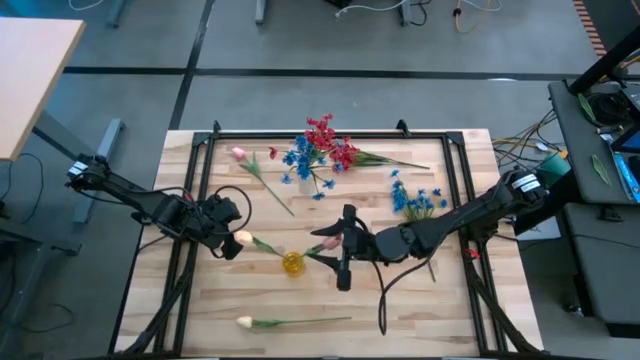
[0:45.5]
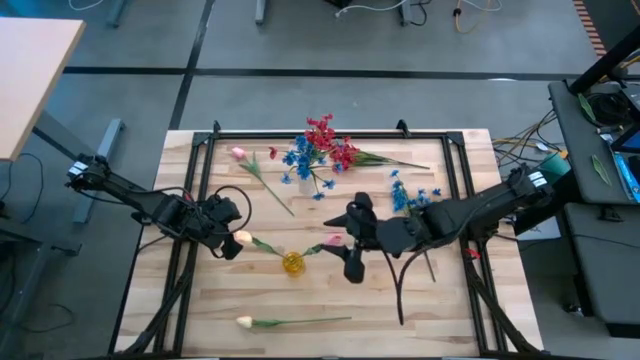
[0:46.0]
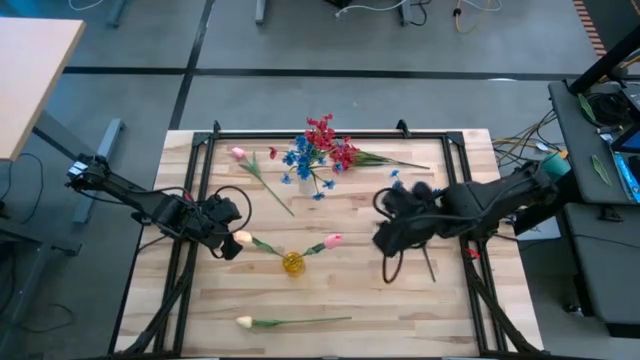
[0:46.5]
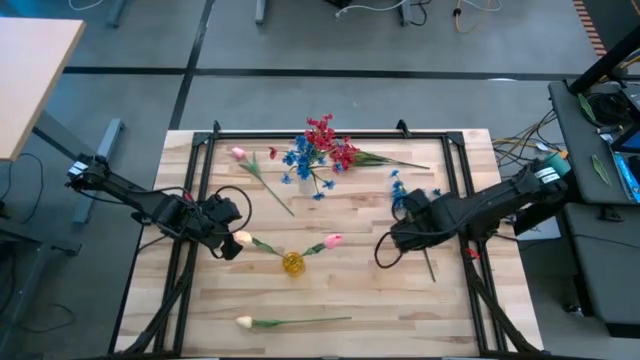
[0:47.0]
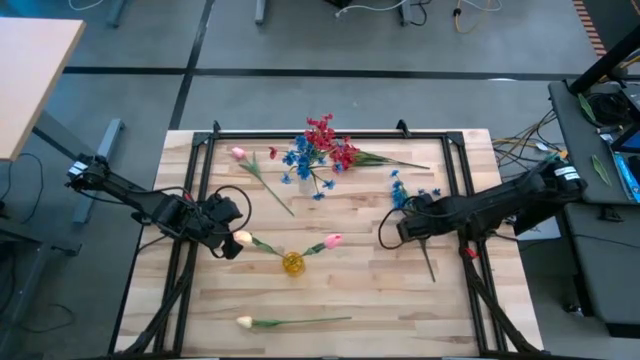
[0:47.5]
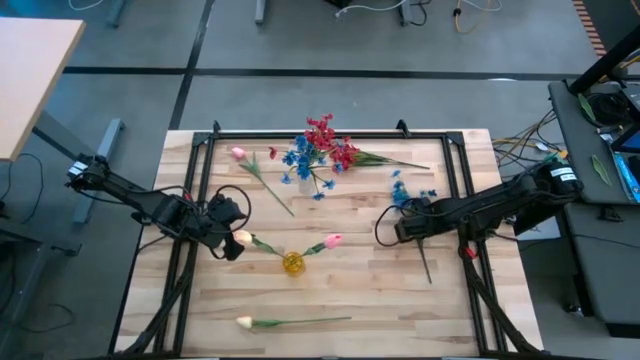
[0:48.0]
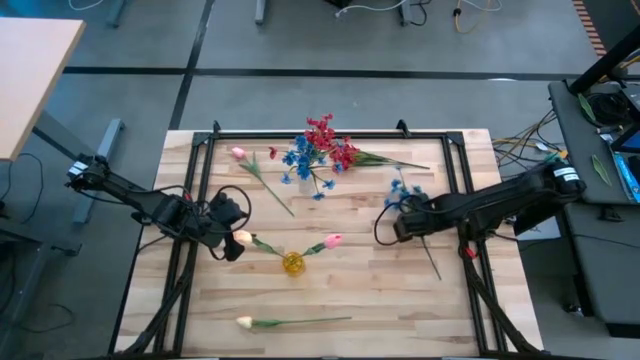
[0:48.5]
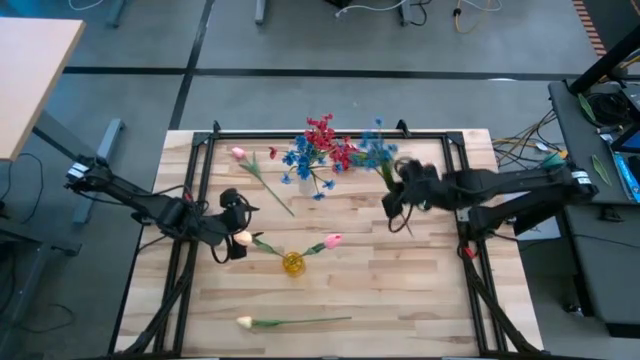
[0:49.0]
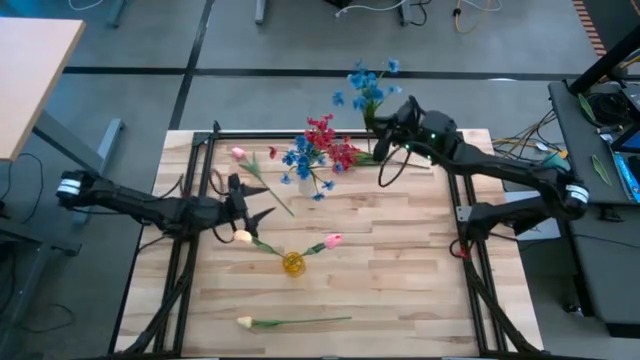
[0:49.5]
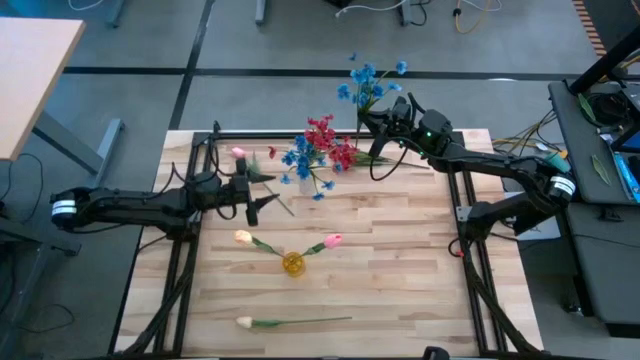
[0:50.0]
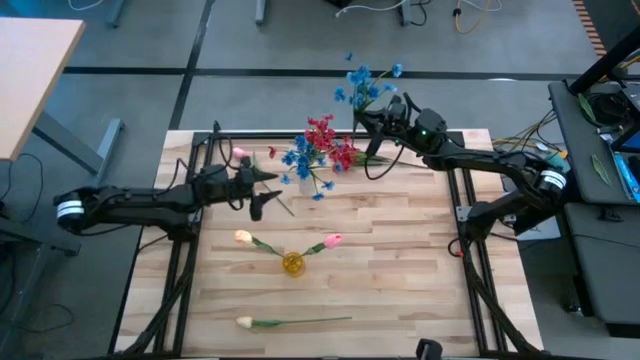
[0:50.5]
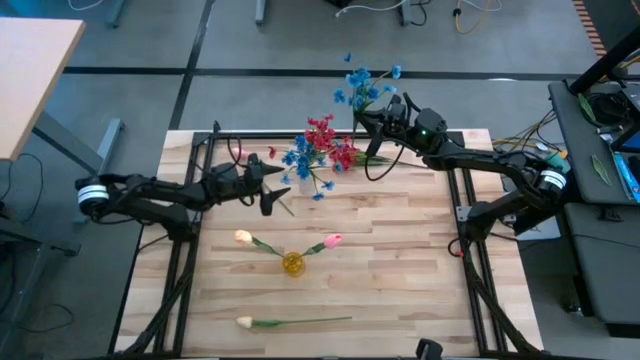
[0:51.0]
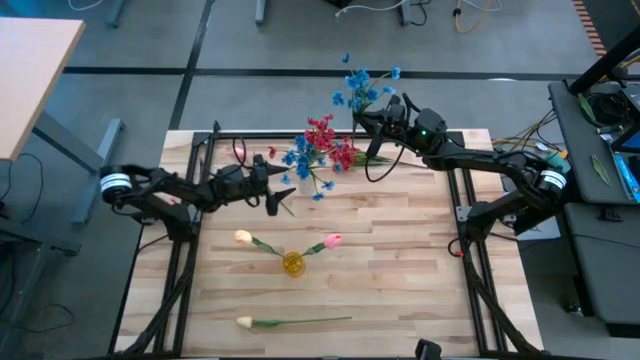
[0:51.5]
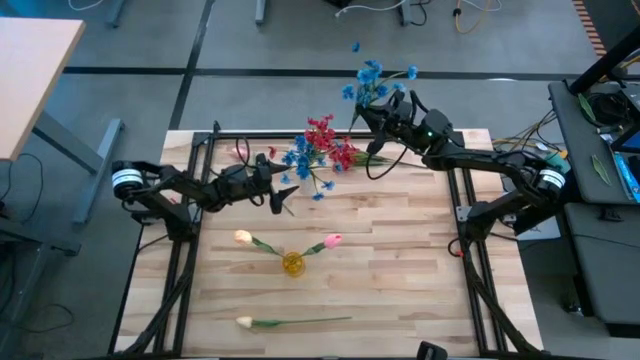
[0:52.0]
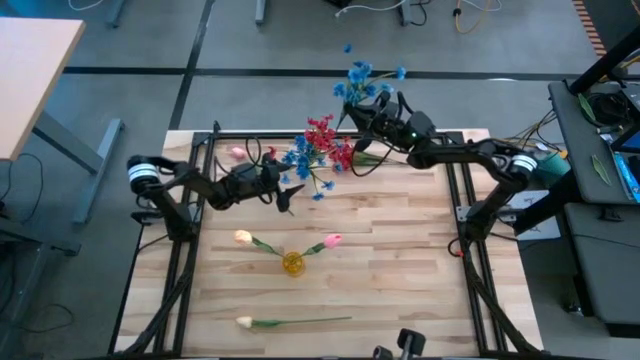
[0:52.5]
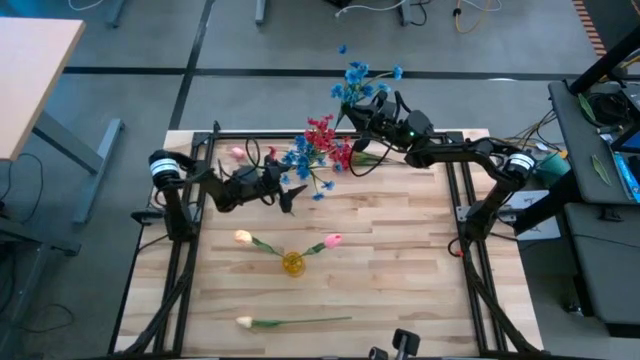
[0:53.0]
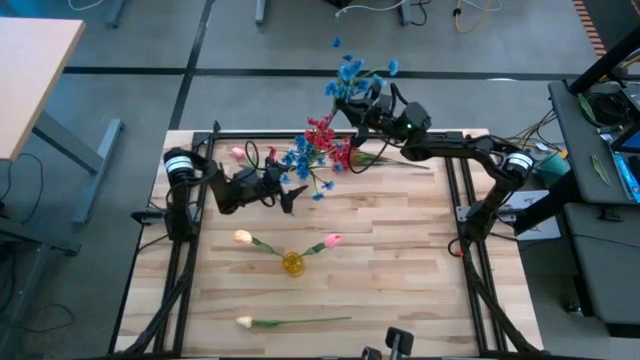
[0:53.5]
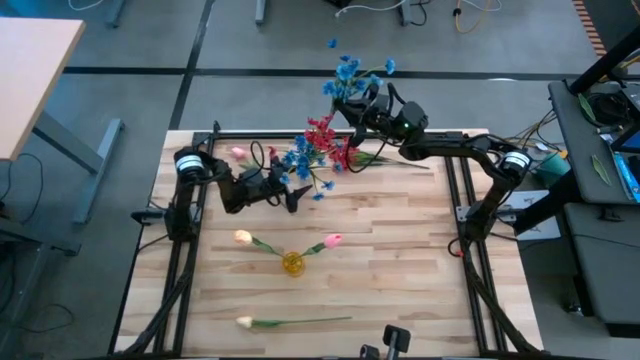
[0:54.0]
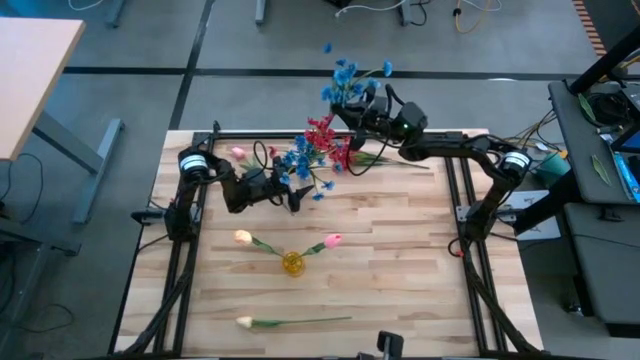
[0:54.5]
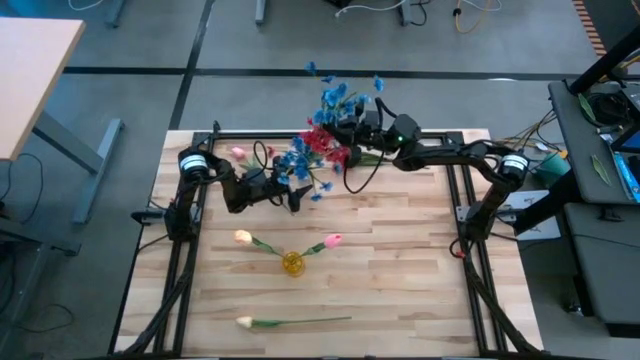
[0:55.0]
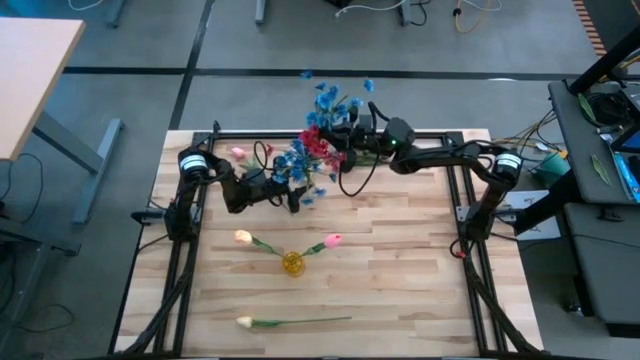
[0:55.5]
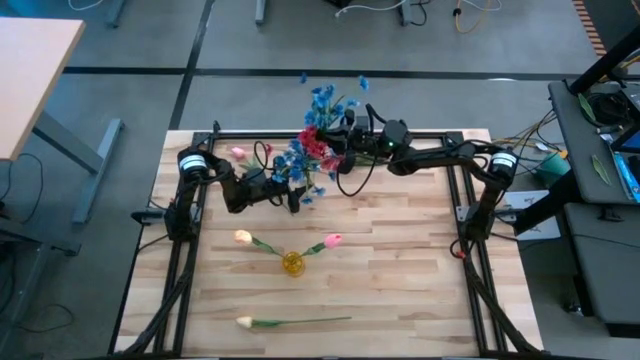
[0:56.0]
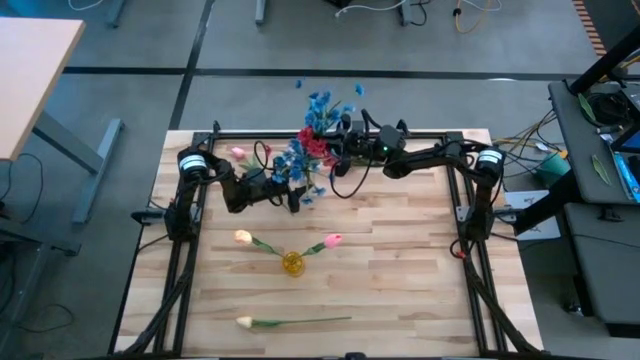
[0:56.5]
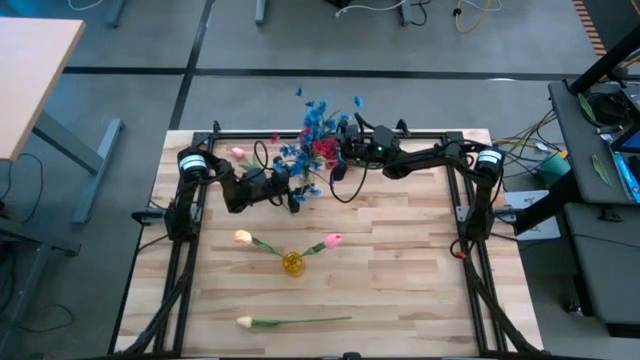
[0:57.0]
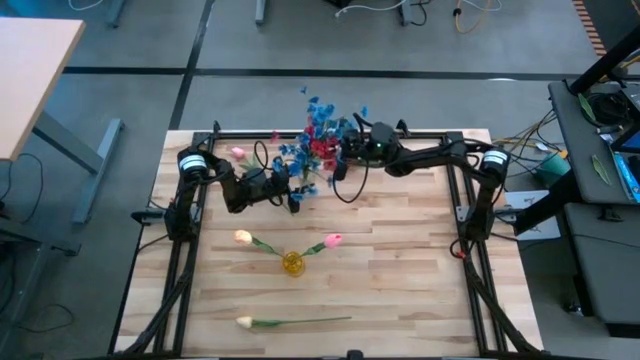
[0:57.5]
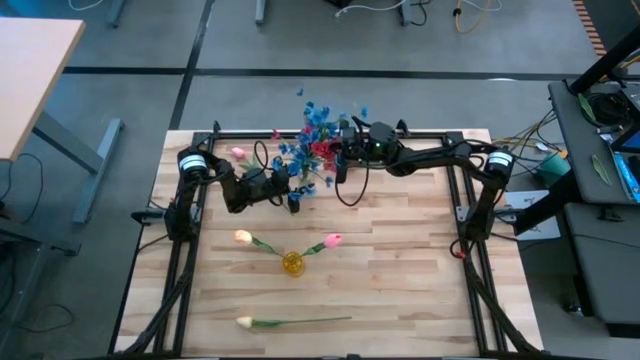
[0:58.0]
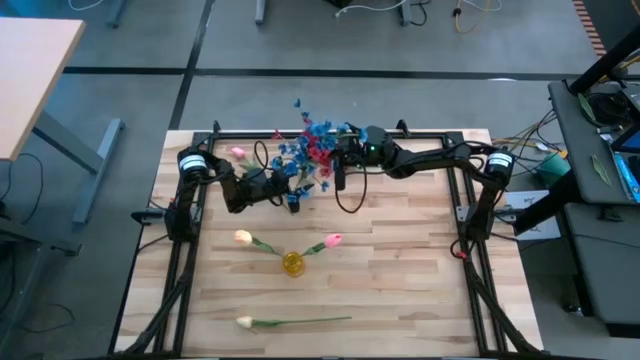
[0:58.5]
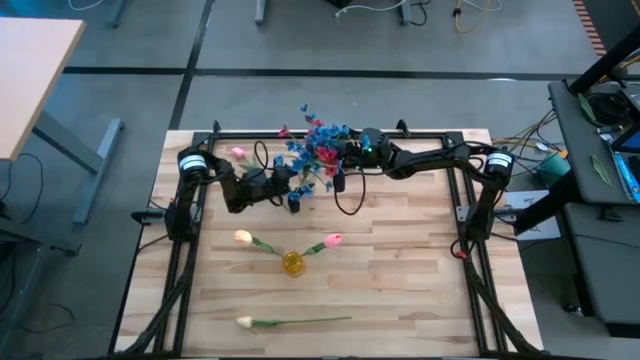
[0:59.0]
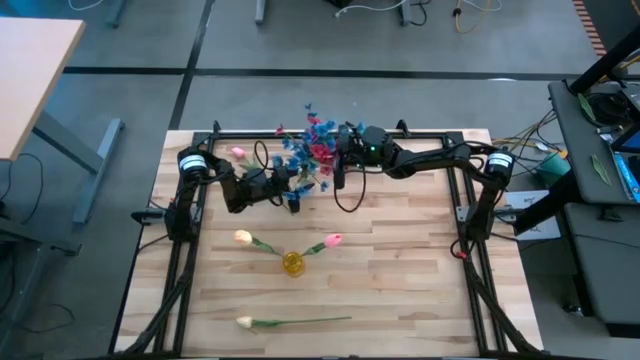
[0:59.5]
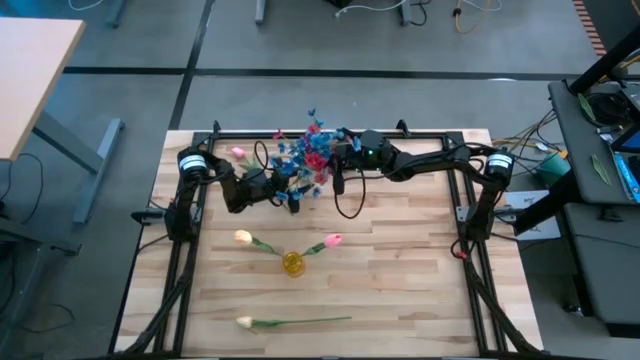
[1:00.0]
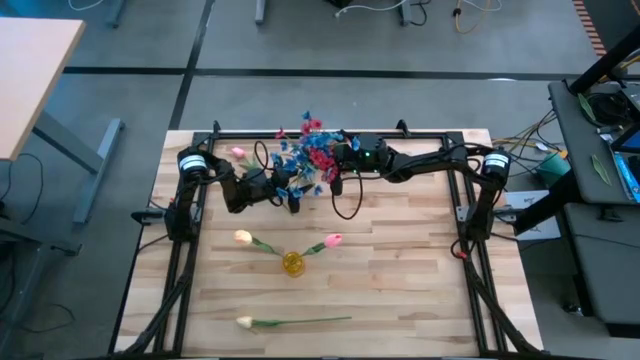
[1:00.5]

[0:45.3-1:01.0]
Task: Sort flowers into vase by color
Put the blue flowers into the transparent vase

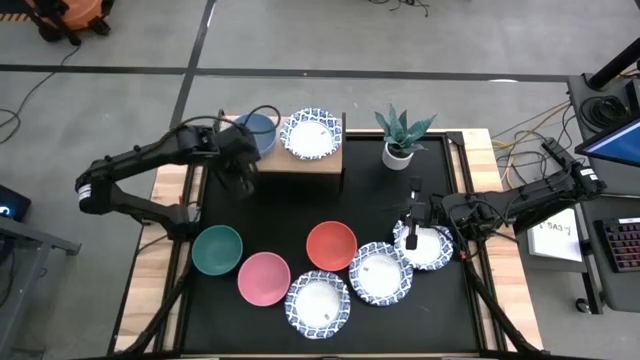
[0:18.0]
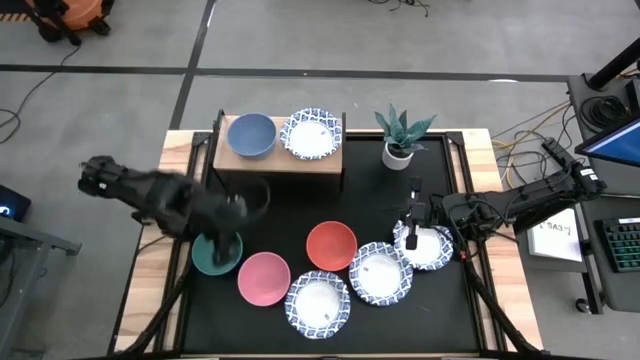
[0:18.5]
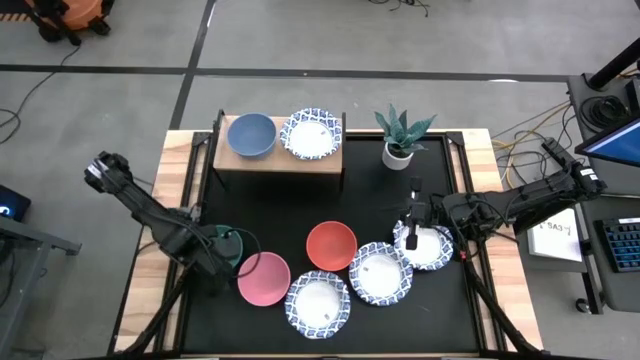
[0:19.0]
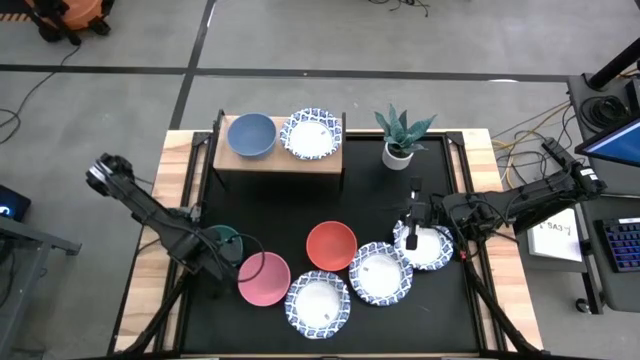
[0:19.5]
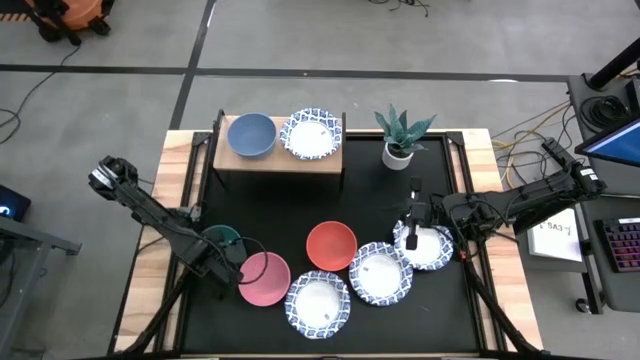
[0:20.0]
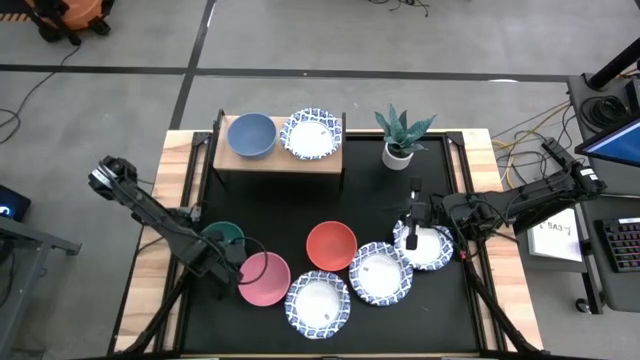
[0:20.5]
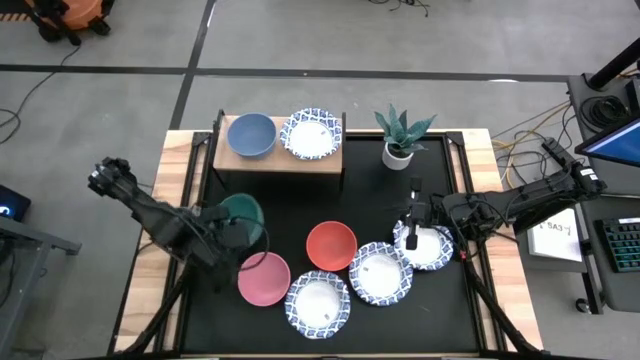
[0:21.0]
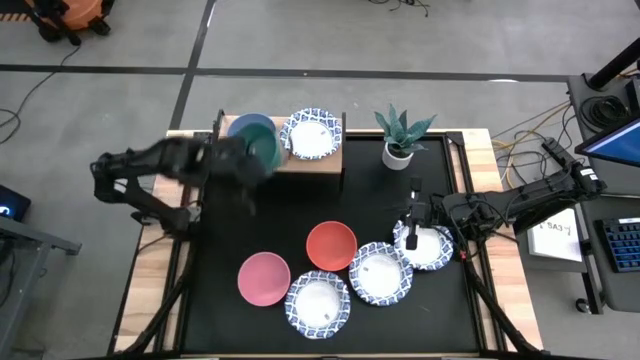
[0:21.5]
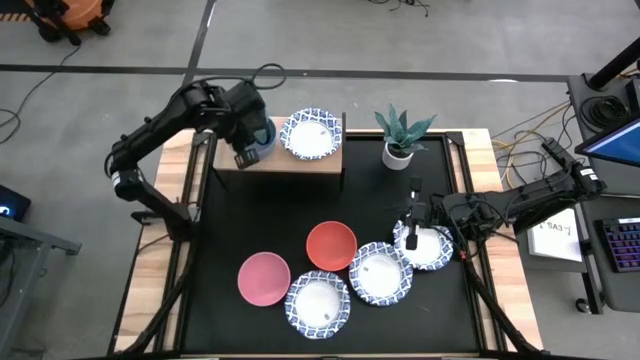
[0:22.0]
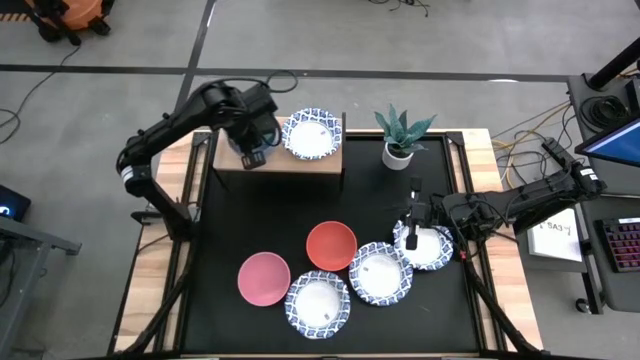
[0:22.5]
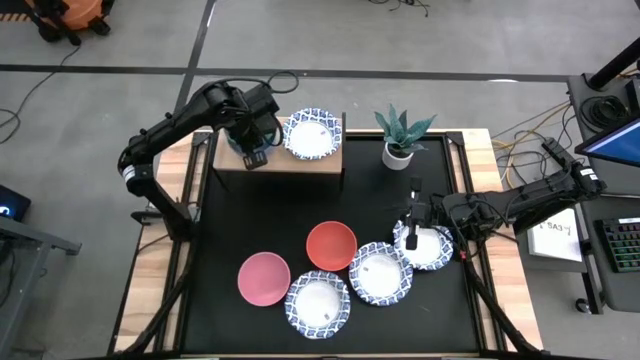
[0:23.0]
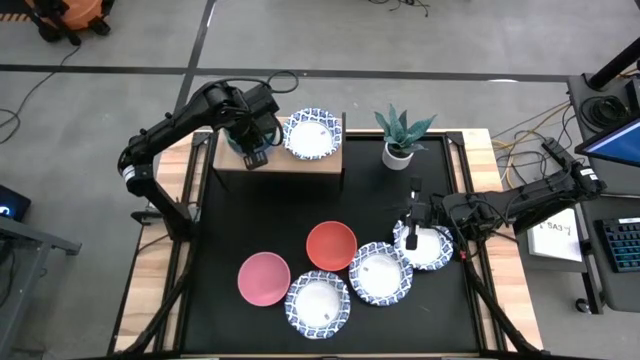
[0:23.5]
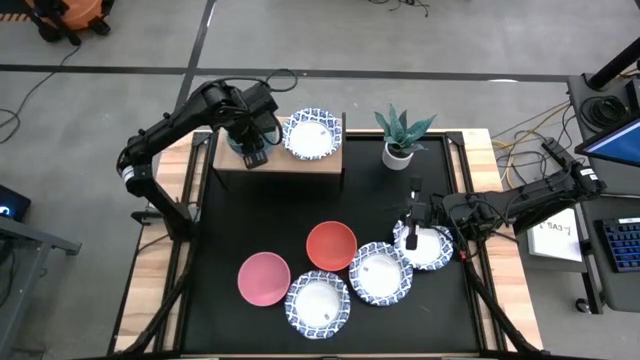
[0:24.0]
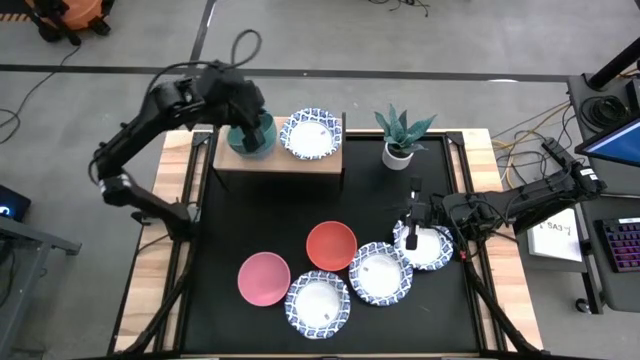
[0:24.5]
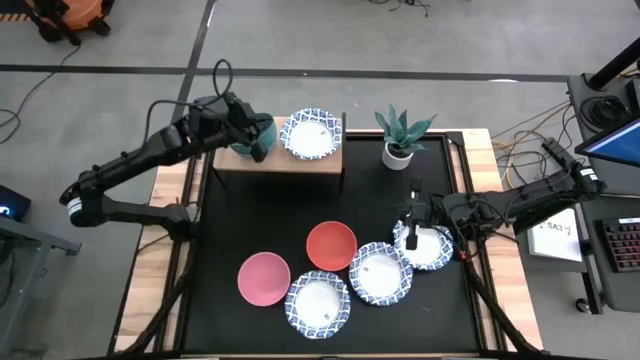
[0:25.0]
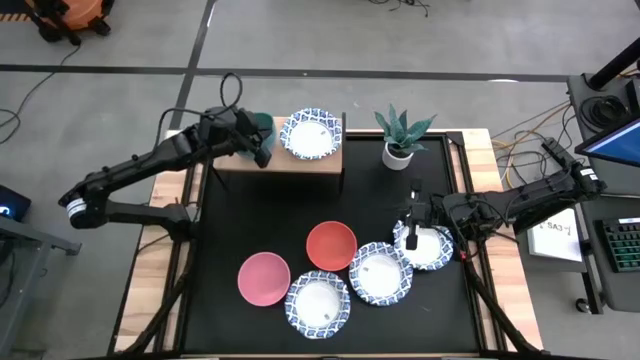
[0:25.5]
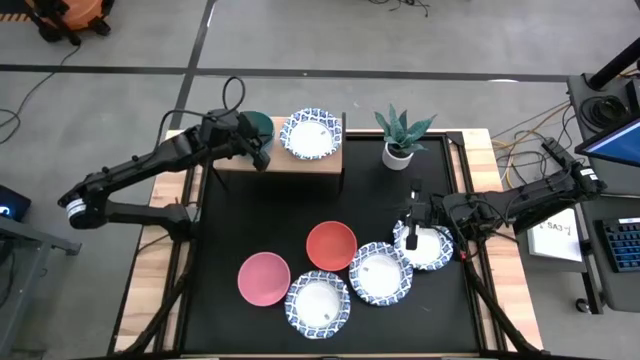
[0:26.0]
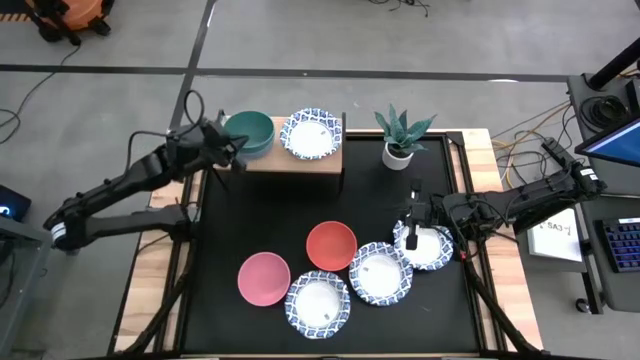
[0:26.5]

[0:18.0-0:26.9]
Task: Place and stack bowls onto a shelf
Stack the green bowl on top of the blue bowl on the shelf
